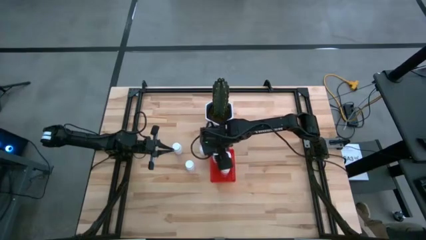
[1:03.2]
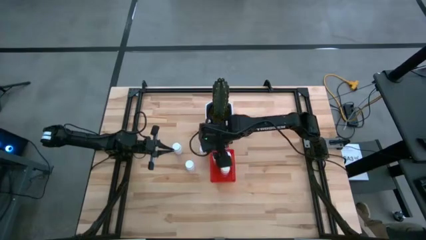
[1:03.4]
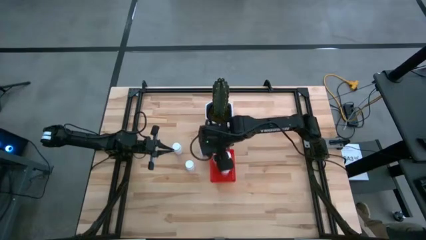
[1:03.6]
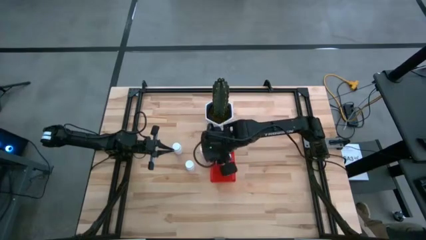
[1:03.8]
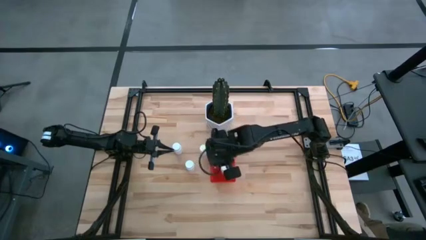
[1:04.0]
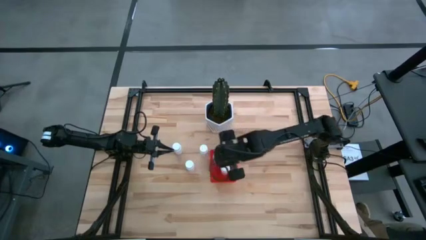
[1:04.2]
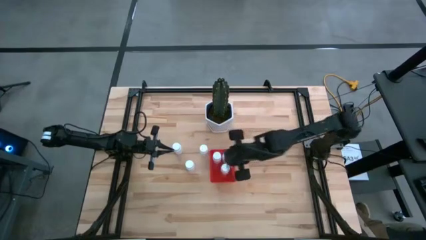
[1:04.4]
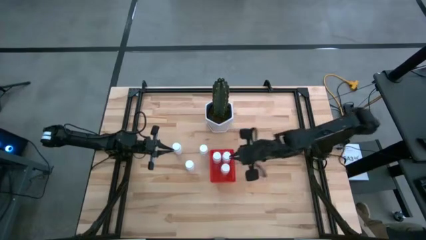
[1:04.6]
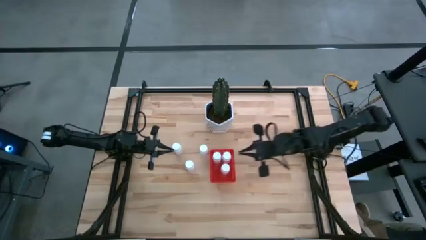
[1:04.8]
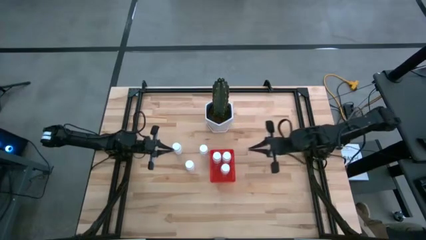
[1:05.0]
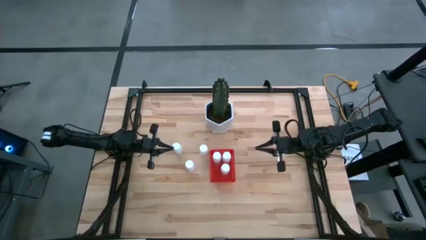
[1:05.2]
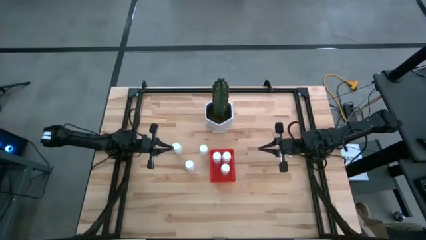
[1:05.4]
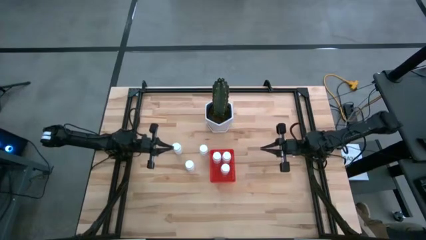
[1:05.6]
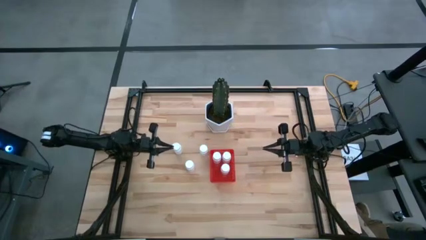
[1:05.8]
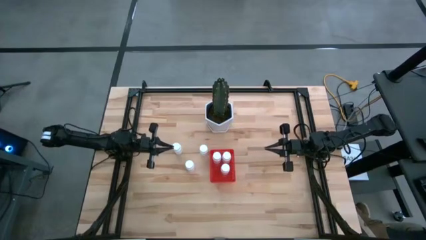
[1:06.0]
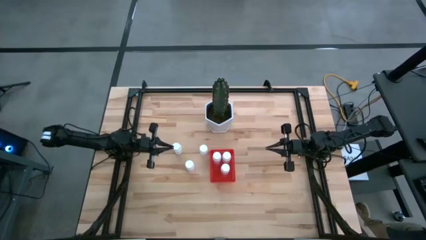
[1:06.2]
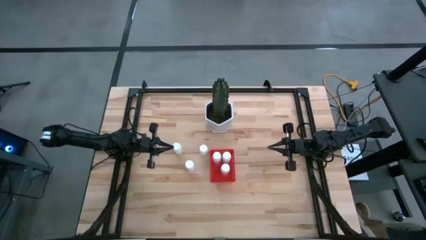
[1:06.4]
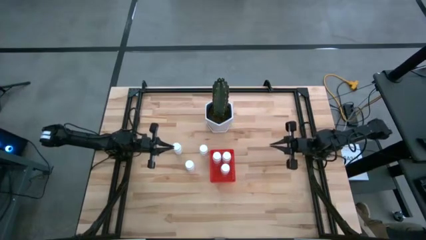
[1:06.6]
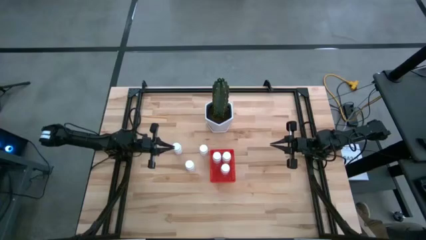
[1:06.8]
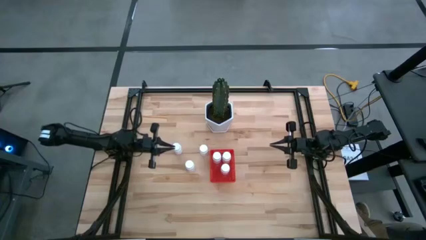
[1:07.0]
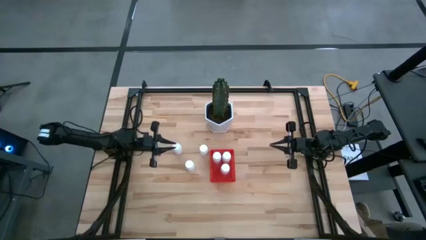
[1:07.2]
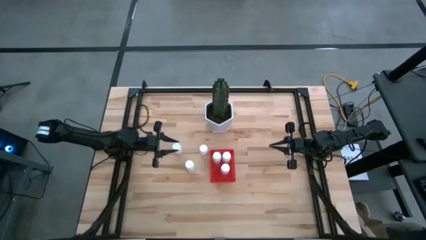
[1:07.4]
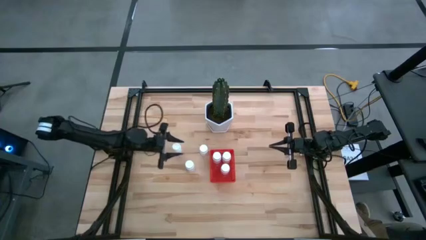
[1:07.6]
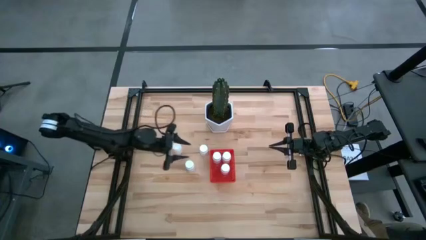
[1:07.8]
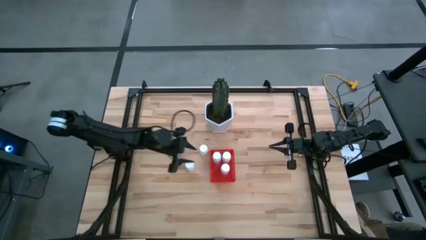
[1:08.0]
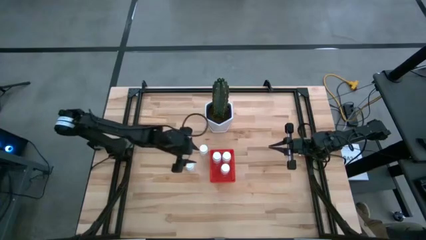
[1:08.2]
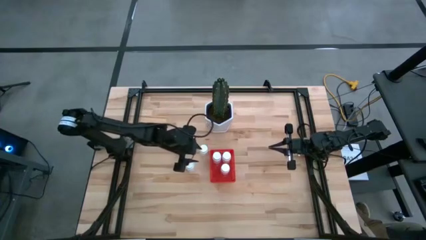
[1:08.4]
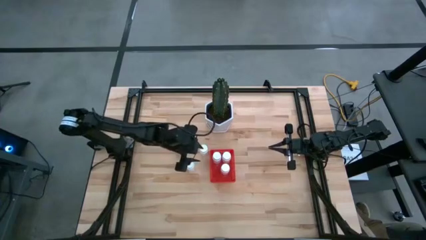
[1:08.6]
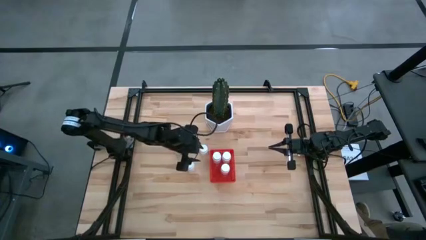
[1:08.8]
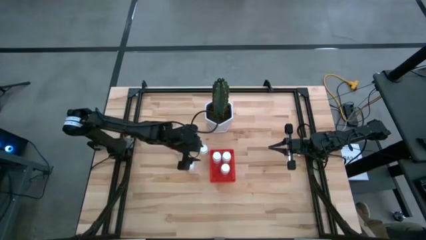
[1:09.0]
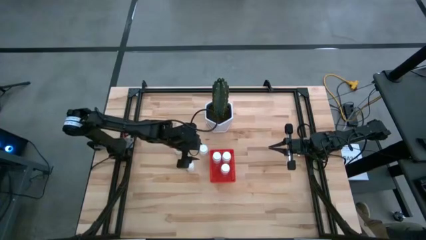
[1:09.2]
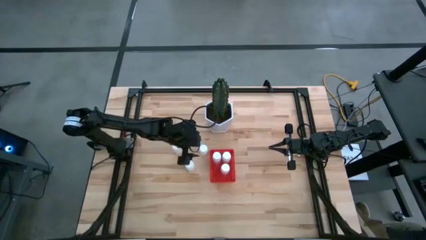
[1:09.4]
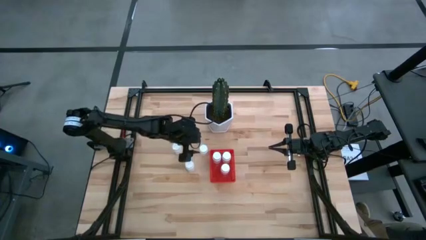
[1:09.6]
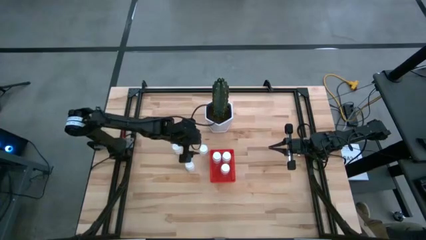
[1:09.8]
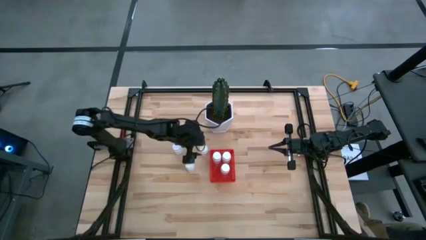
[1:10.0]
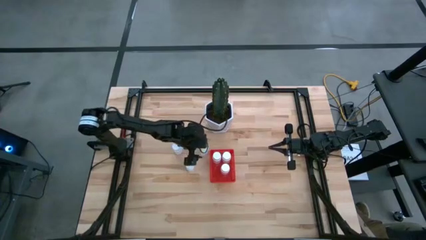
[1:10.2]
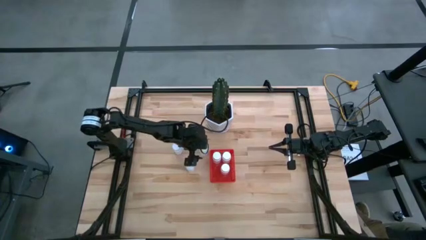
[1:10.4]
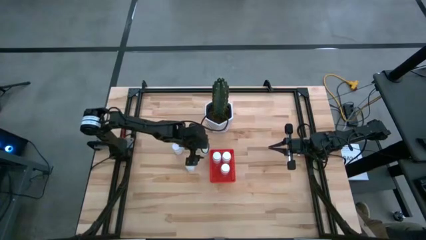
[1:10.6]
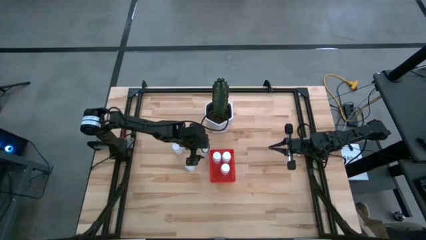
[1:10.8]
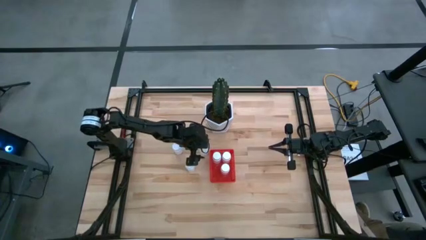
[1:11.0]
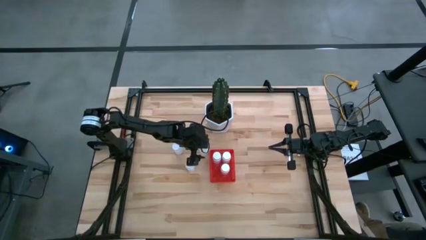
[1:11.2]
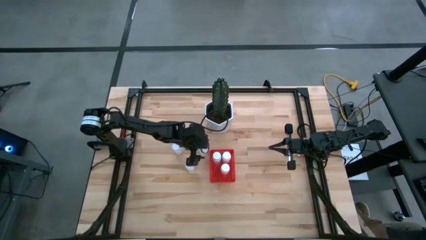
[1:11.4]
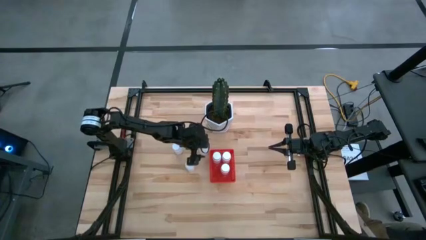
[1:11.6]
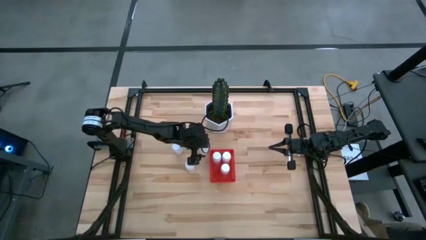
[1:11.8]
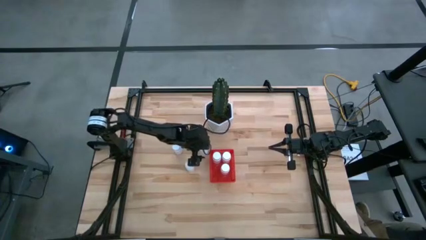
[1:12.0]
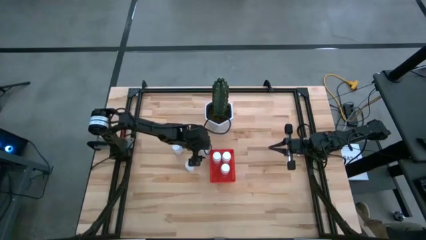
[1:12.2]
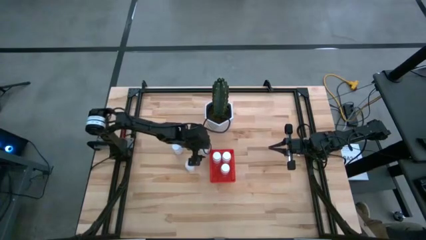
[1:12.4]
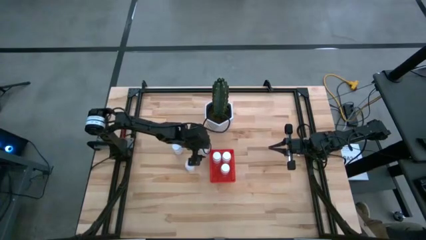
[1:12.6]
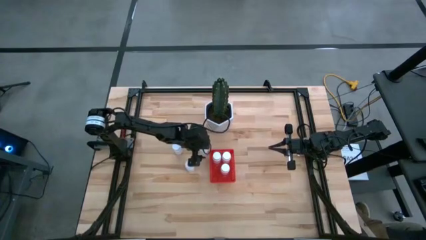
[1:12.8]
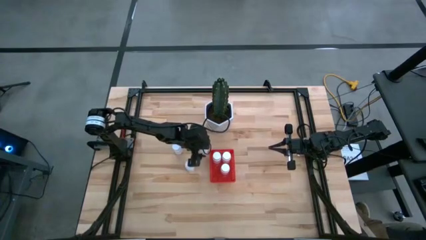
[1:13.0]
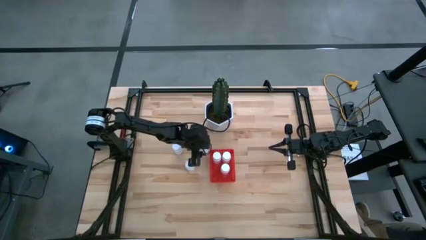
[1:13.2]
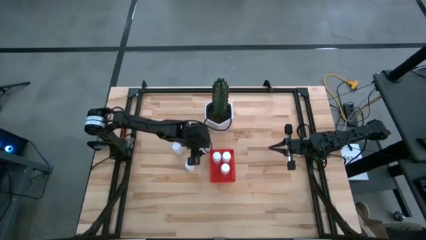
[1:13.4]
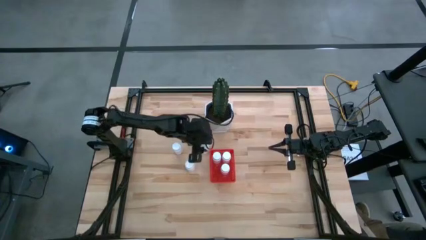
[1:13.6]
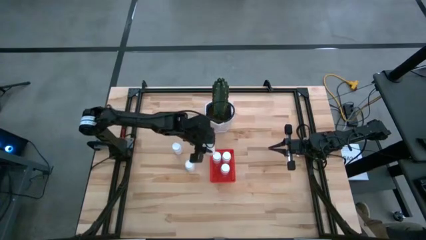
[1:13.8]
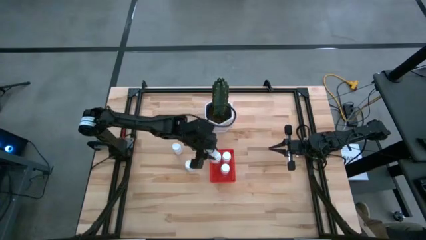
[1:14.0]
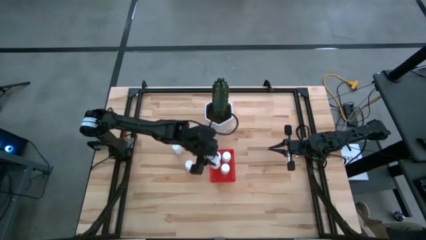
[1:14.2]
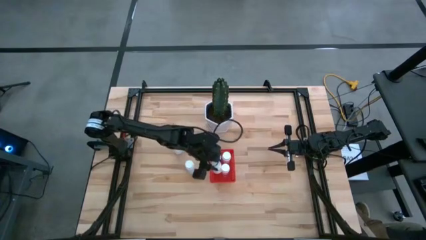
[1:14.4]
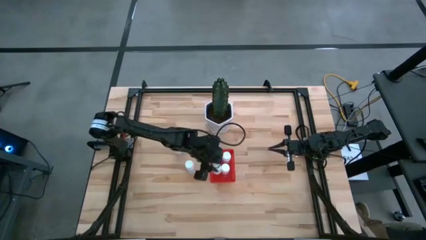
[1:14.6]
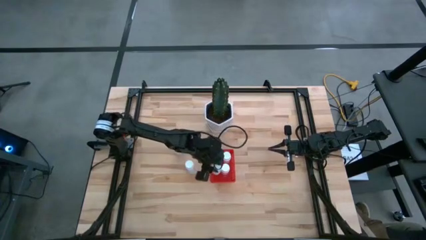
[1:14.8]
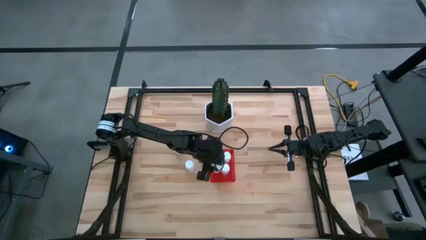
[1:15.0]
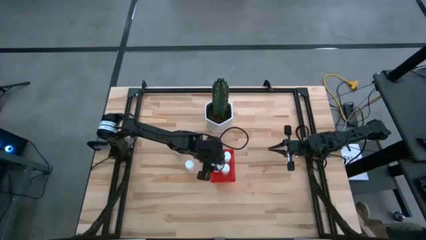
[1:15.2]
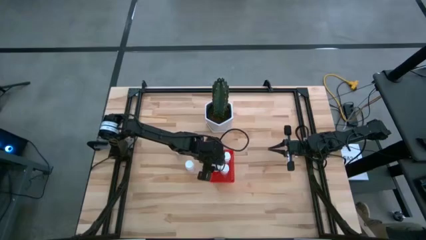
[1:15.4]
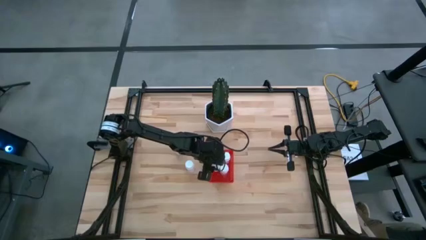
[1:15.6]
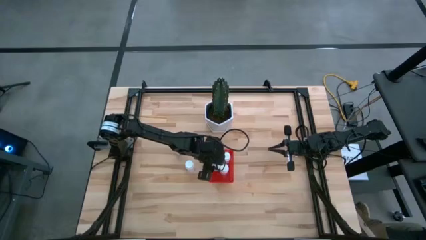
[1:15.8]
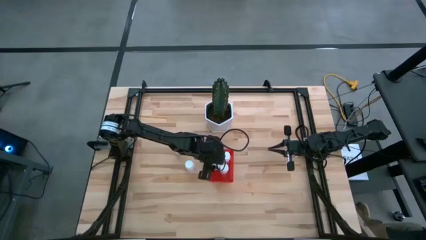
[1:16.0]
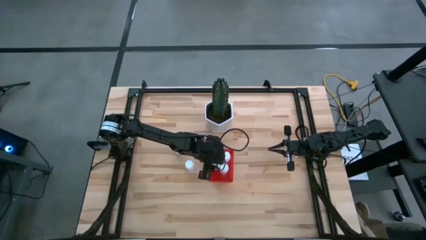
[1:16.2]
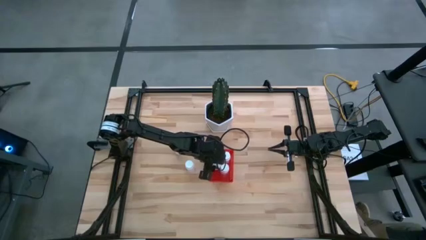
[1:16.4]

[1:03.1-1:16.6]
Task: Pick and place pill bottles into a basket
Put the white pill bottle into the red bin
